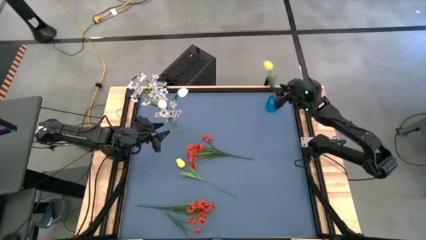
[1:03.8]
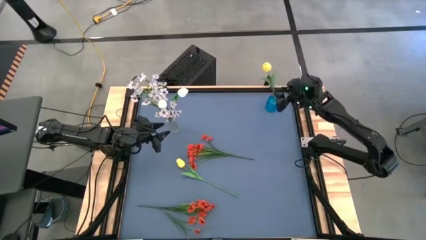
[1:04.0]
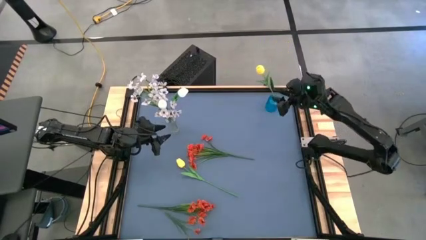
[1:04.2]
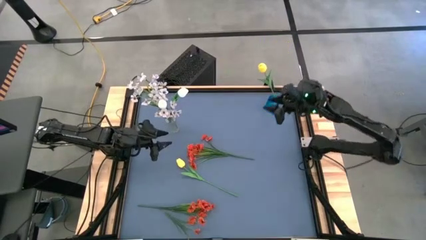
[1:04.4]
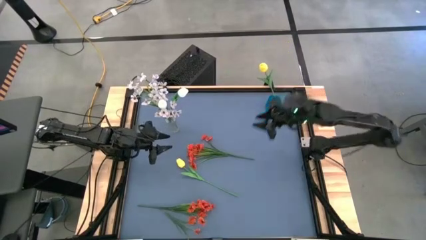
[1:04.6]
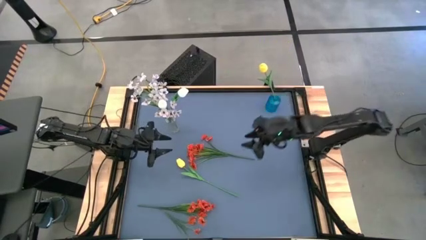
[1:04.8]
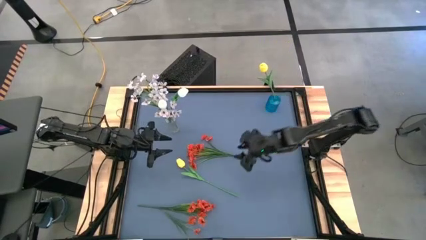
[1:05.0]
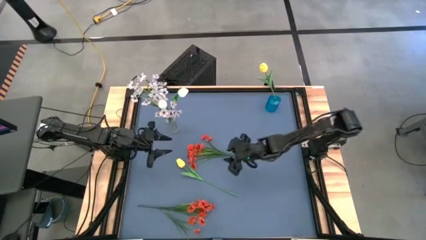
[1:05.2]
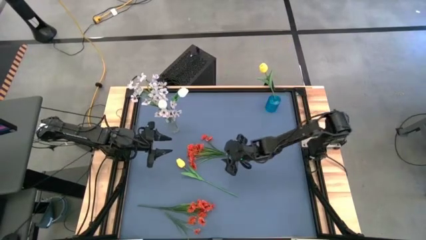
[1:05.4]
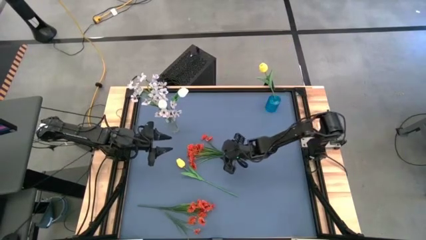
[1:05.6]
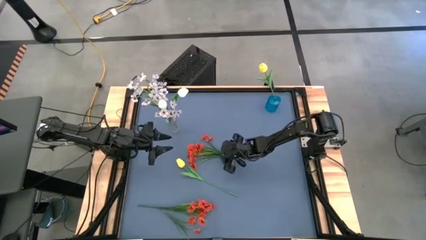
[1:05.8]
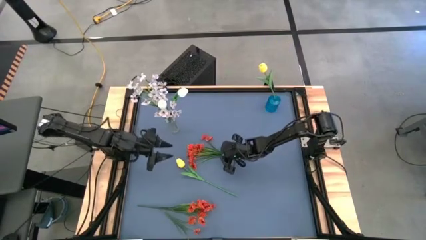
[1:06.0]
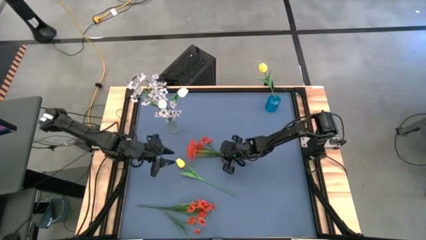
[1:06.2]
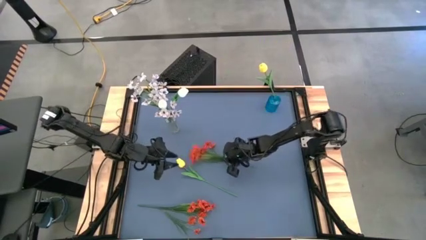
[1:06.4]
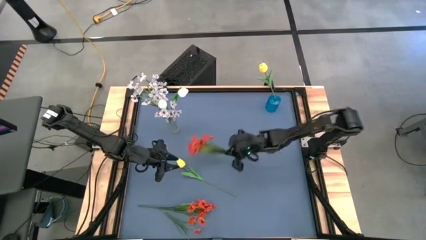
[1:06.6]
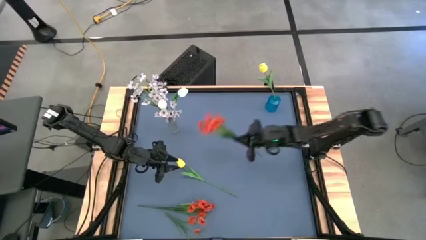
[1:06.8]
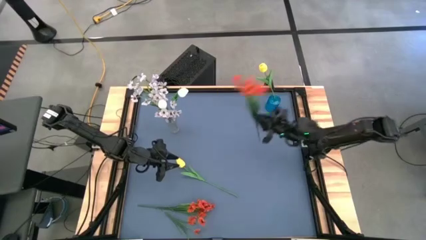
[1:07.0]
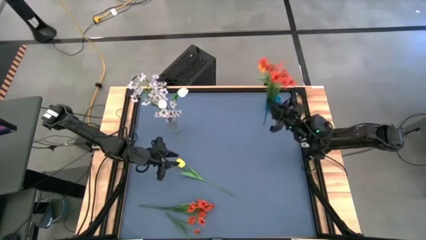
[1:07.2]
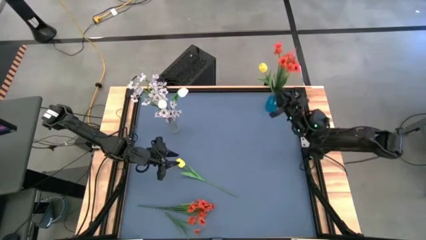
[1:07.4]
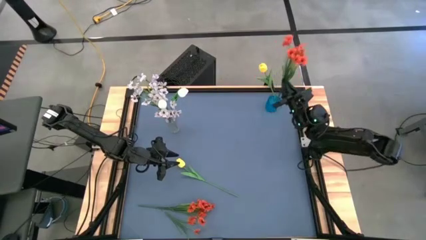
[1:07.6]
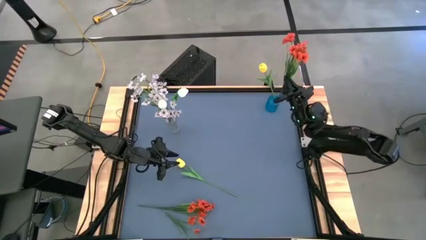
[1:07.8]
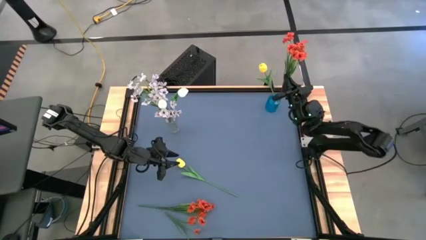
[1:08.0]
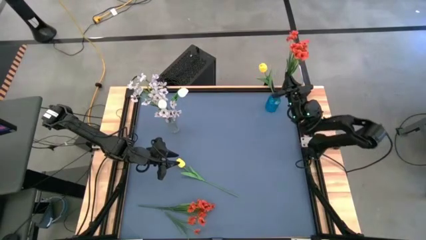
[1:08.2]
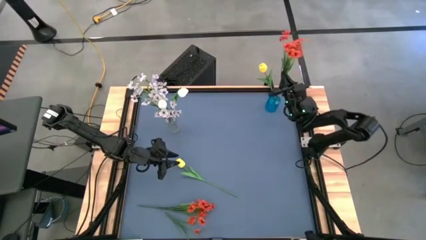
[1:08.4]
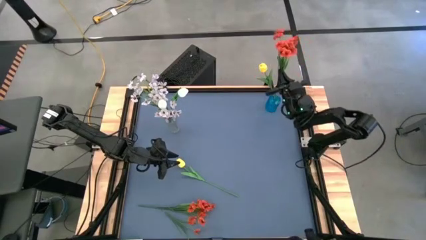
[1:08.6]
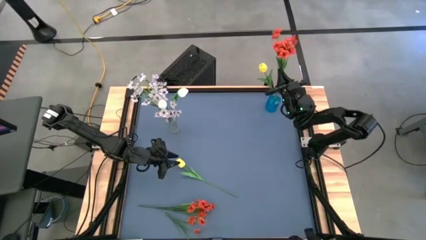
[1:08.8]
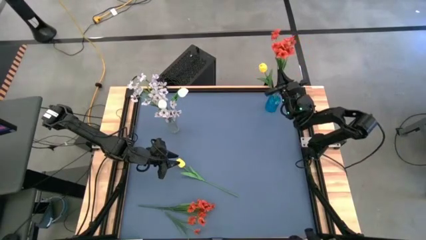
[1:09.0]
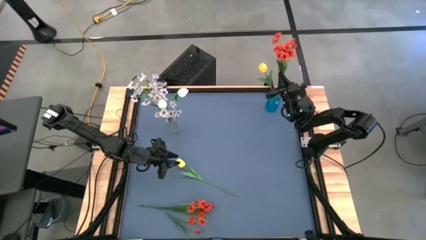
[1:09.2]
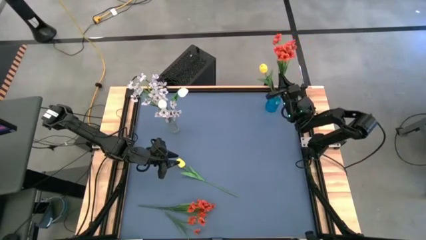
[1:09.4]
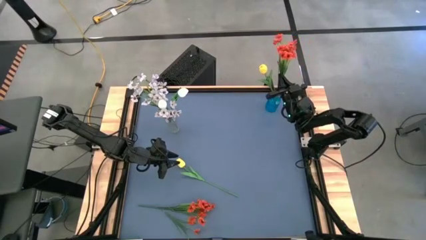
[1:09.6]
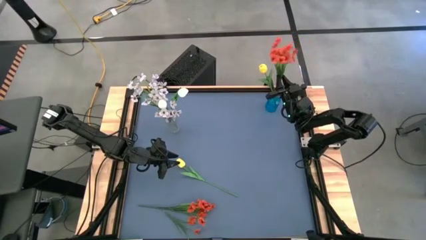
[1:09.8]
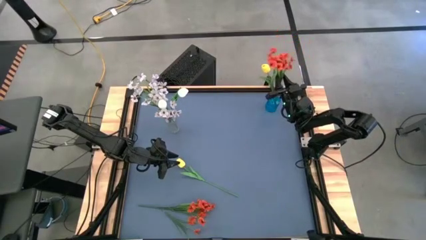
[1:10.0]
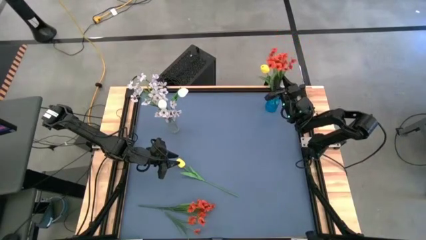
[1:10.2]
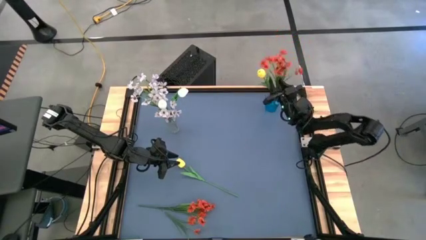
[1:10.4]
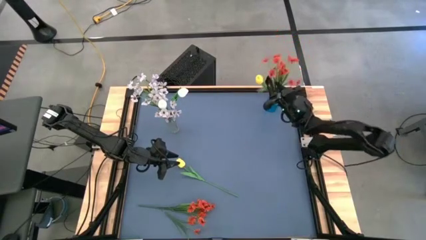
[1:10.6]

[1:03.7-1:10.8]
Task: Sort flowers into vase by color
Put the top orange flowers into the blue vase

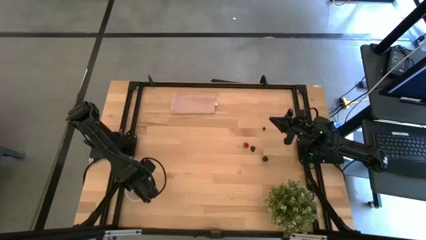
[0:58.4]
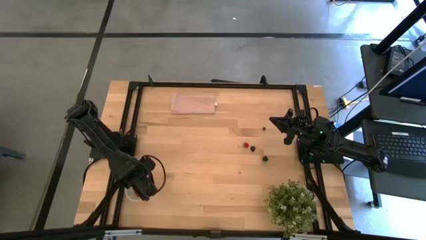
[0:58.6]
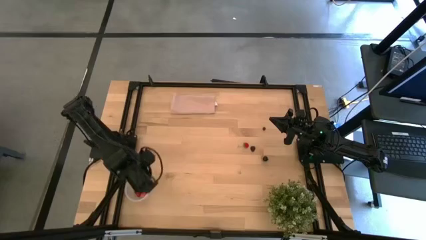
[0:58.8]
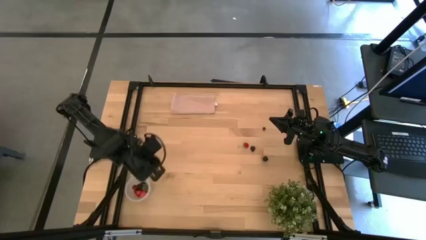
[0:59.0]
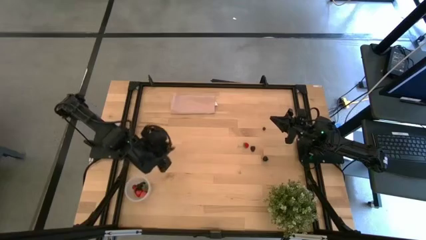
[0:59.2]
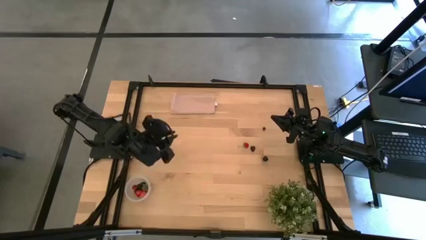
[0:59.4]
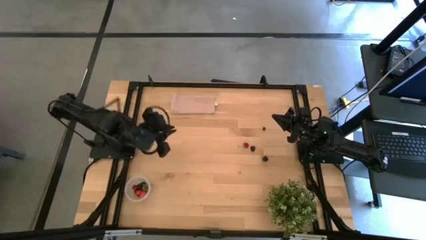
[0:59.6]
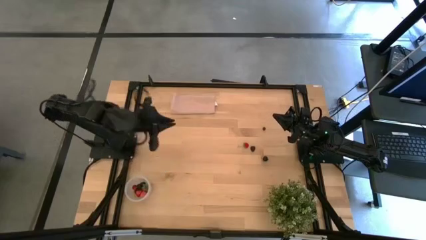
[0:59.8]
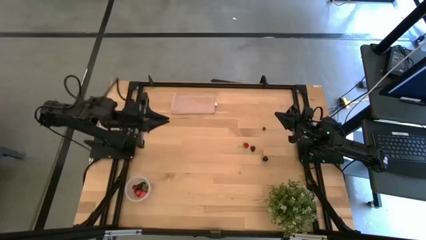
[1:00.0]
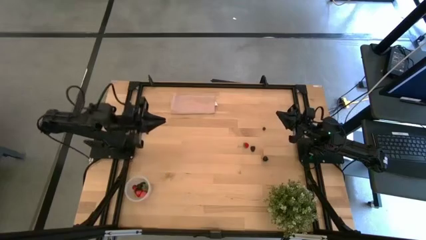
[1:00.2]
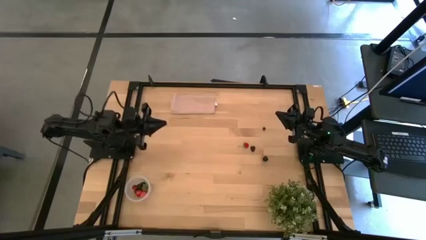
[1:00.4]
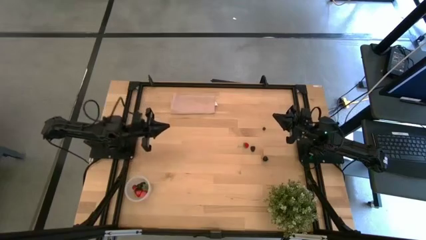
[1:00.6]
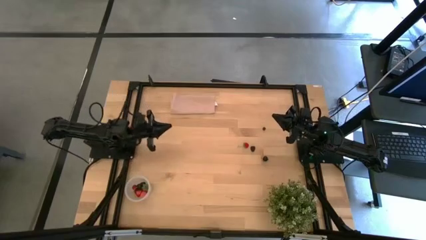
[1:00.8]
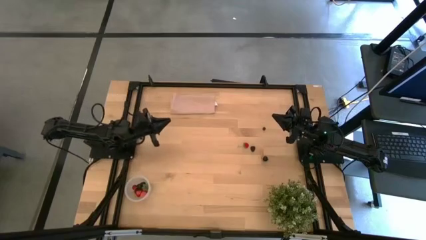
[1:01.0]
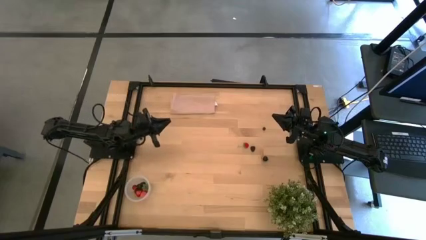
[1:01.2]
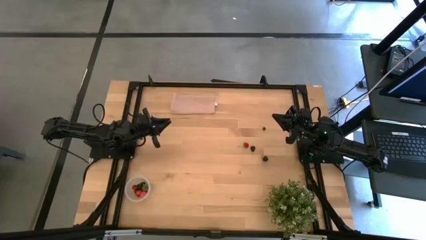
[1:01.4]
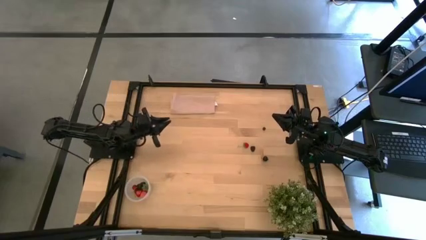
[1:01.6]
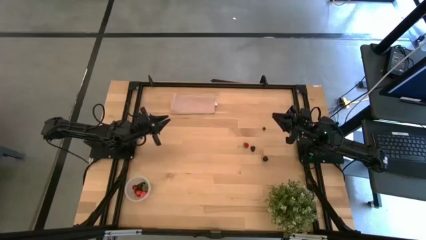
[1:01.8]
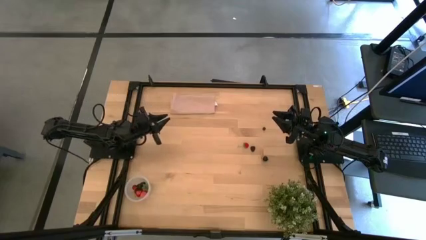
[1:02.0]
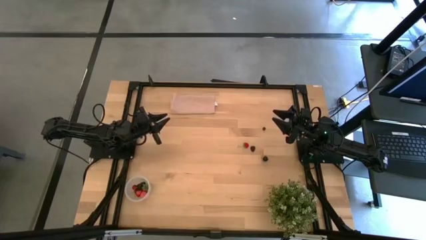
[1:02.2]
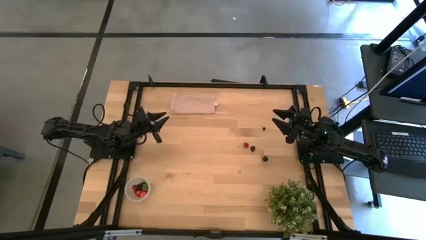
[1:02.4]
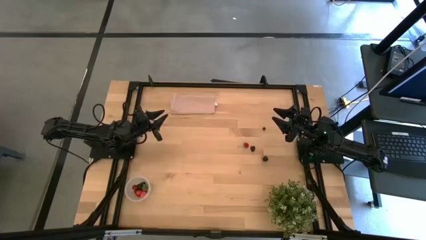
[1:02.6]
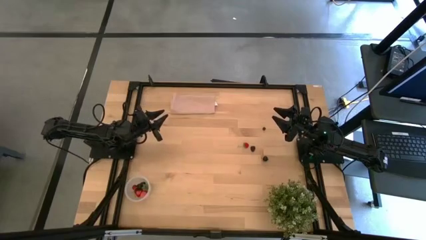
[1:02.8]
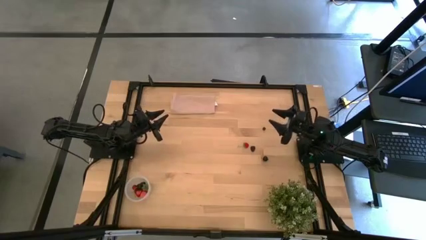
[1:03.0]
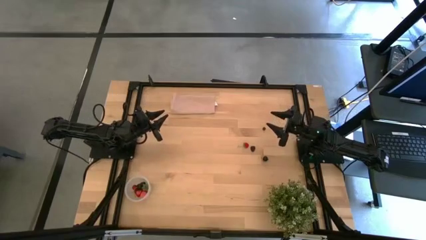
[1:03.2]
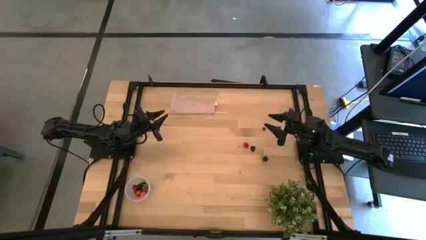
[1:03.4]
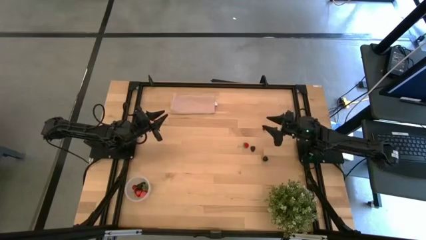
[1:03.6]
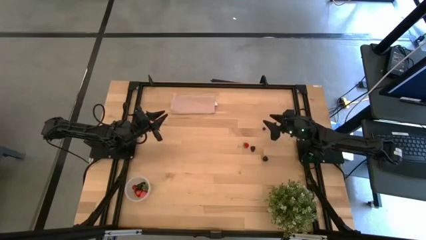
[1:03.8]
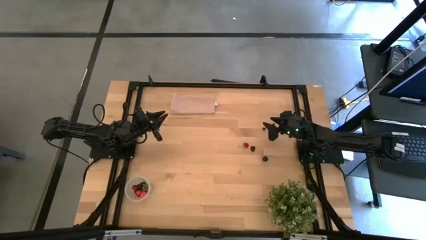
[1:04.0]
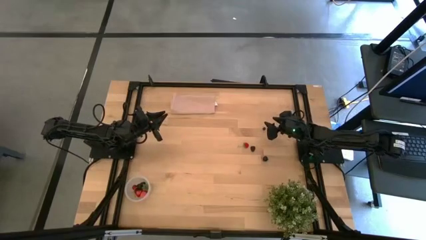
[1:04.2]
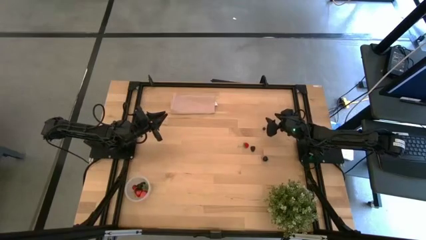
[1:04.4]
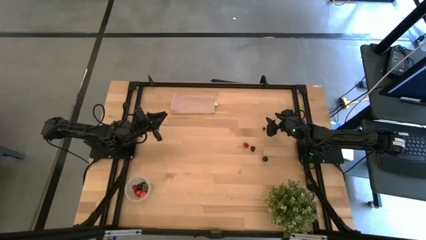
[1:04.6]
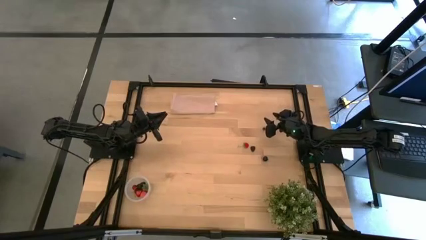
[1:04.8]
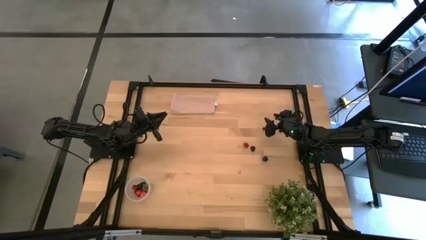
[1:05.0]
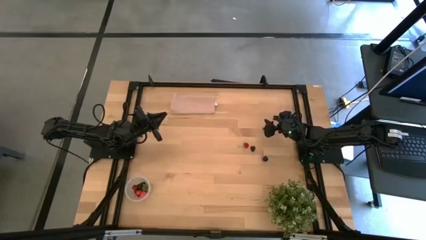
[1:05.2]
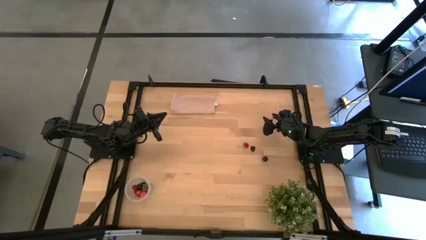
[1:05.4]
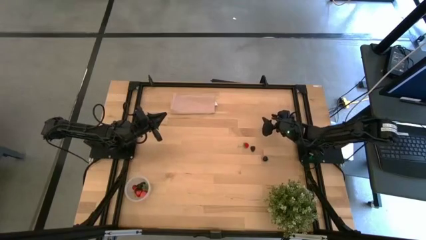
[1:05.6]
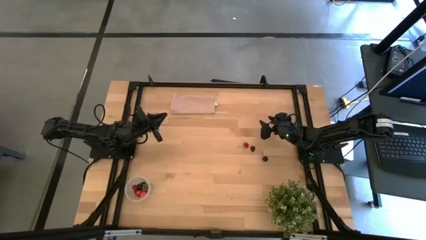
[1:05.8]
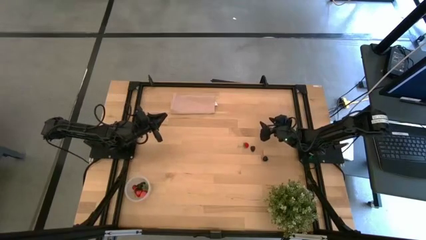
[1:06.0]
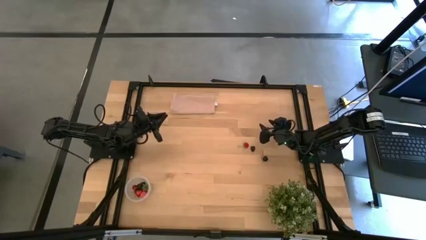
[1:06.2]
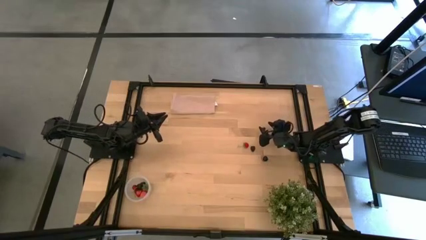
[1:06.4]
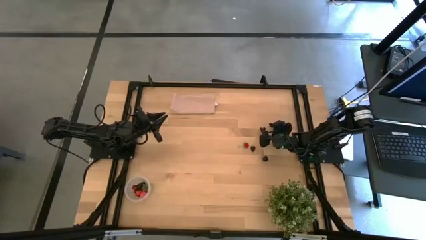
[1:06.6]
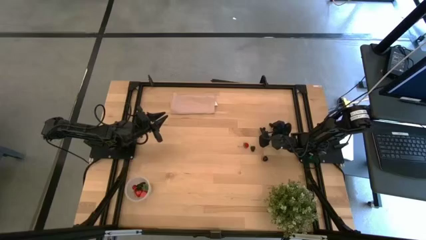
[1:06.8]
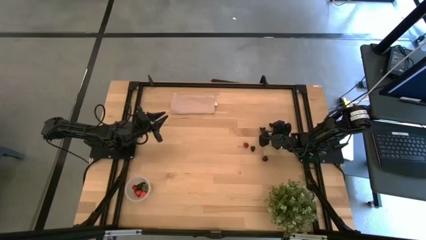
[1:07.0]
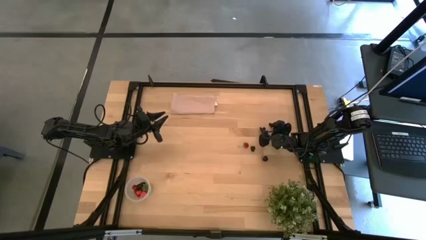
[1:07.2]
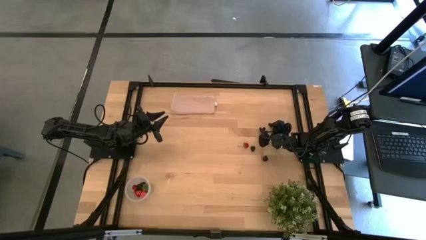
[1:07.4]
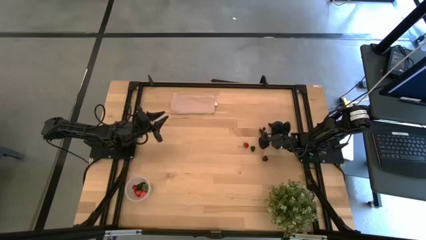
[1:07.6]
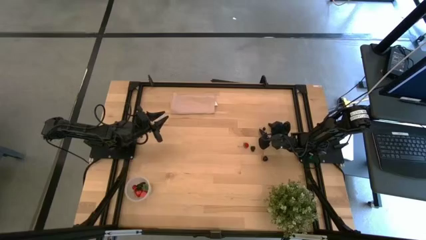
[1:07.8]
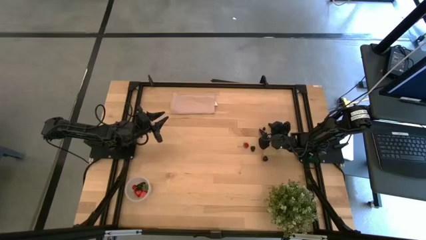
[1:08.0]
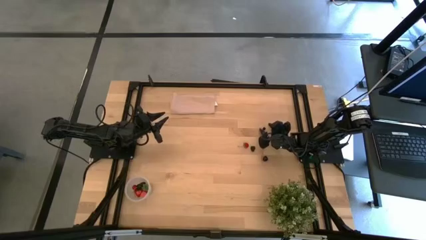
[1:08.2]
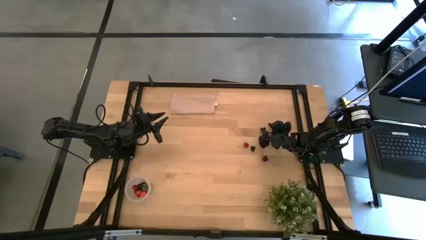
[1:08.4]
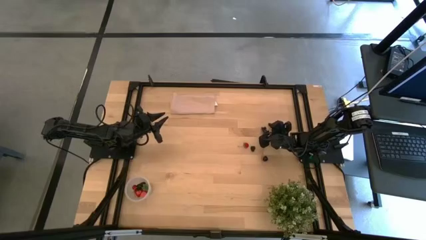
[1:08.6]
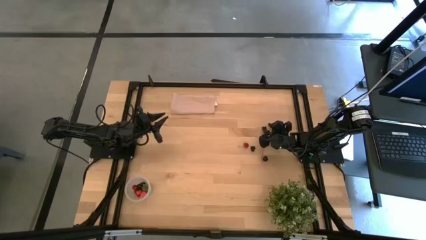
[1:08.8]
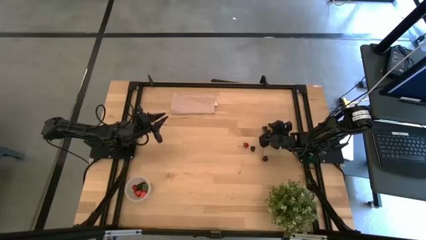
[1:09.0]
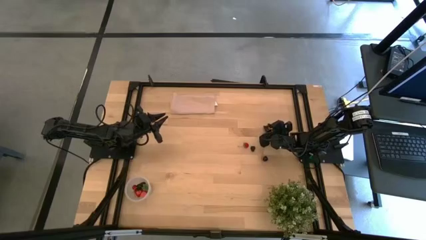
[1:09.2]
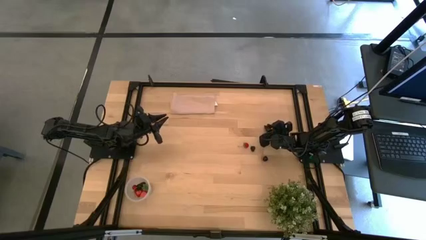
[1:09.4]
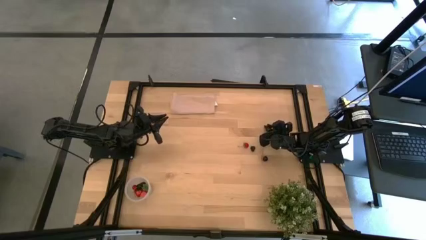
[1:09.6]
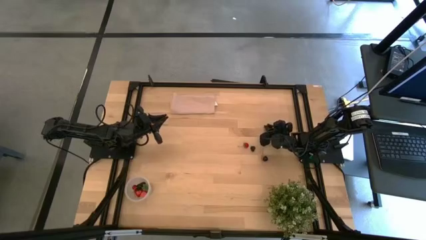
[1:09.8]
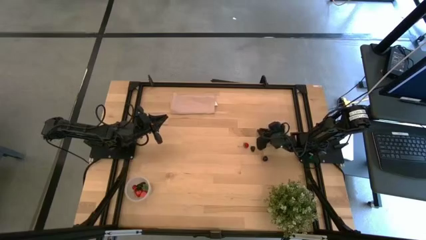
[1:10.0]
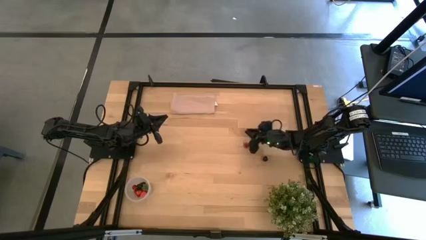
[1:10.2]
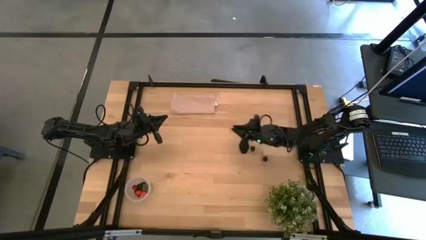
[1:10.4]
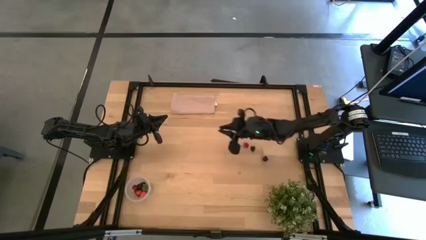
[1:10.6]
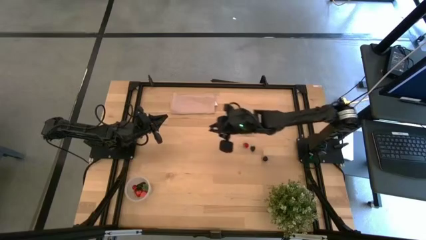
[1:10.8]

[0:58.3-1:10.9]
Task: Pick and placing Produce into tupperware
Put the blueberry into the transparent bin
